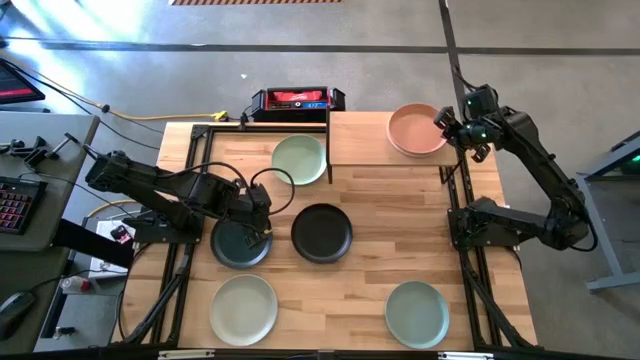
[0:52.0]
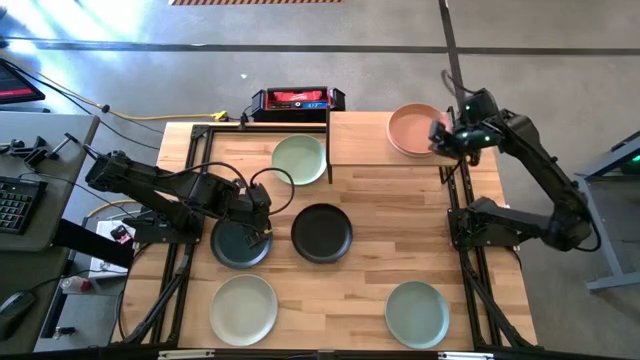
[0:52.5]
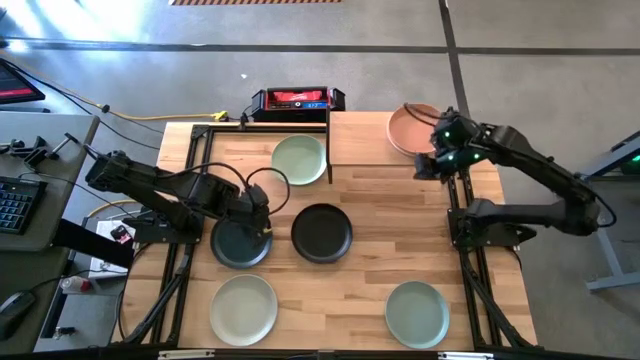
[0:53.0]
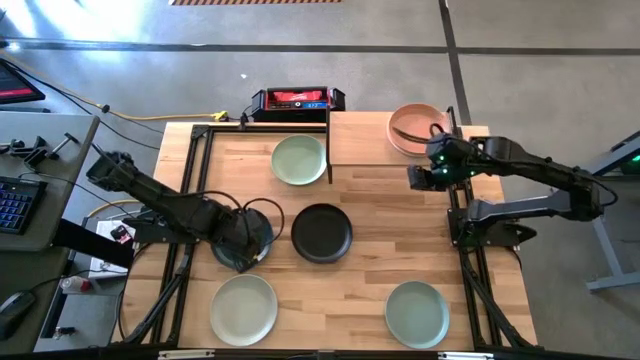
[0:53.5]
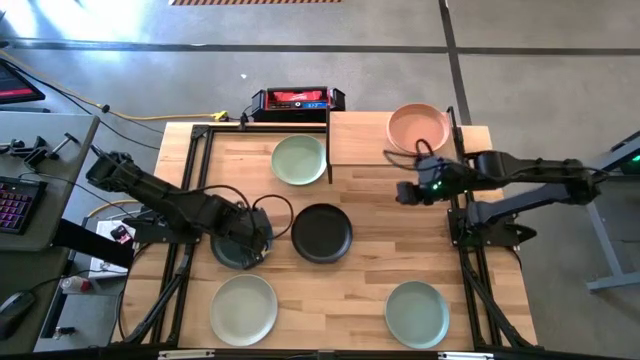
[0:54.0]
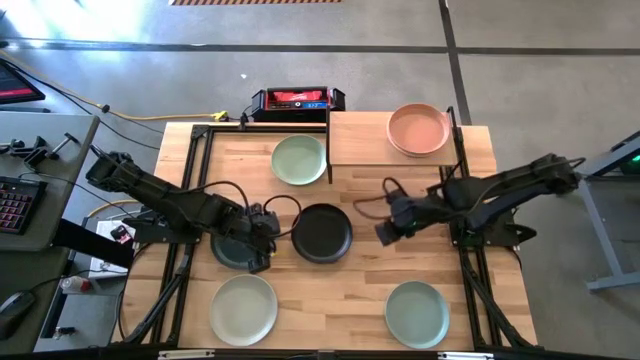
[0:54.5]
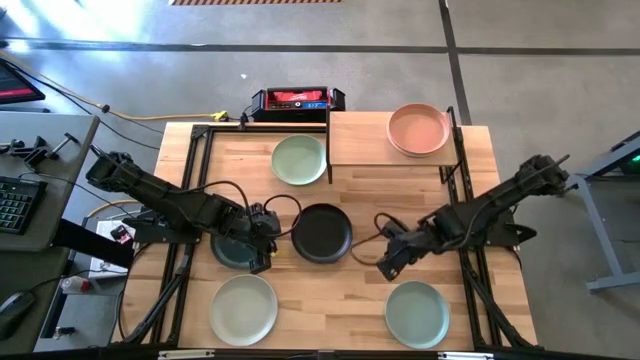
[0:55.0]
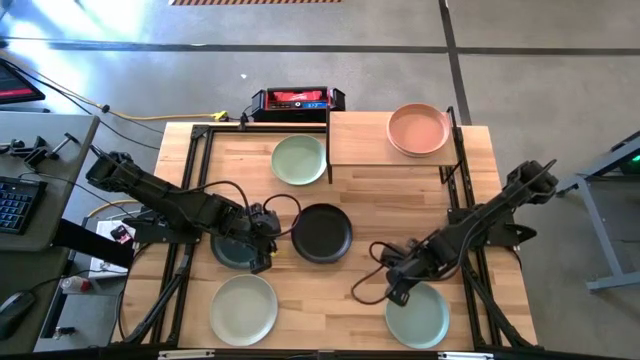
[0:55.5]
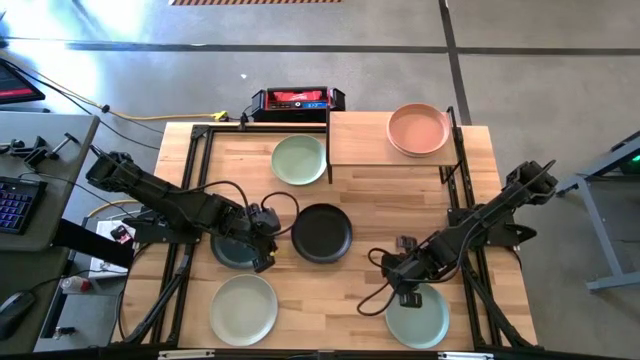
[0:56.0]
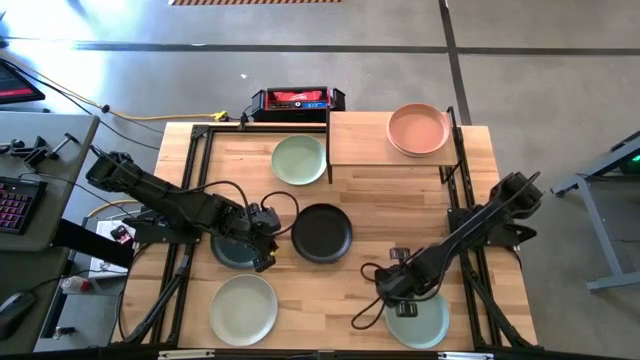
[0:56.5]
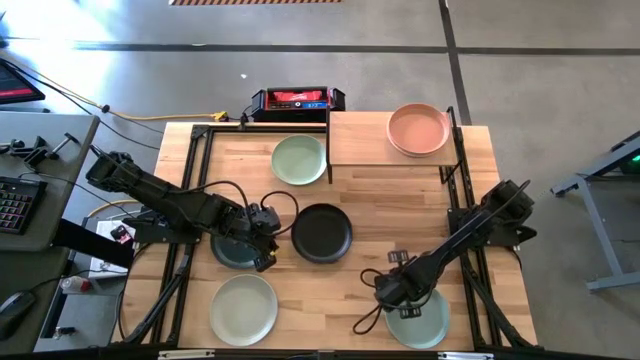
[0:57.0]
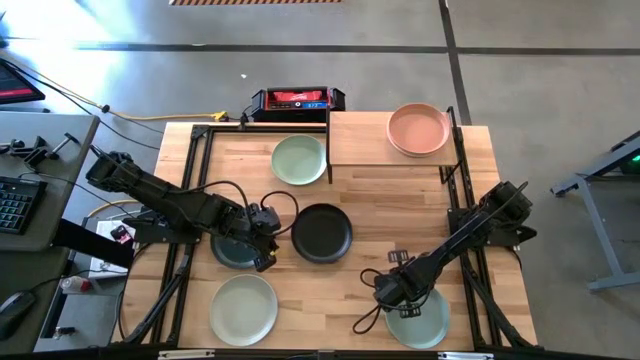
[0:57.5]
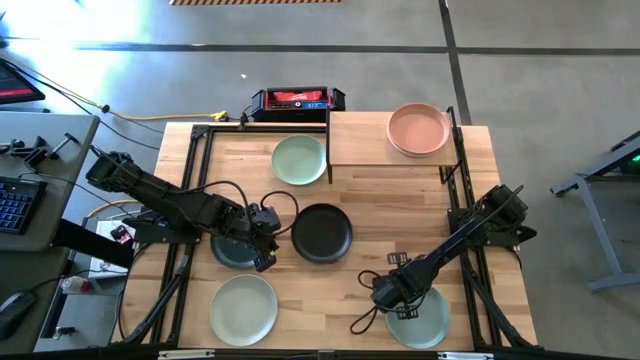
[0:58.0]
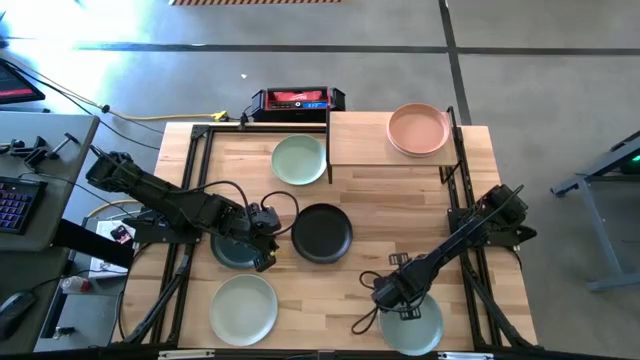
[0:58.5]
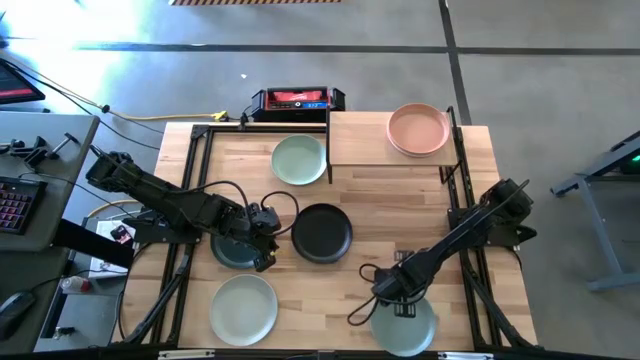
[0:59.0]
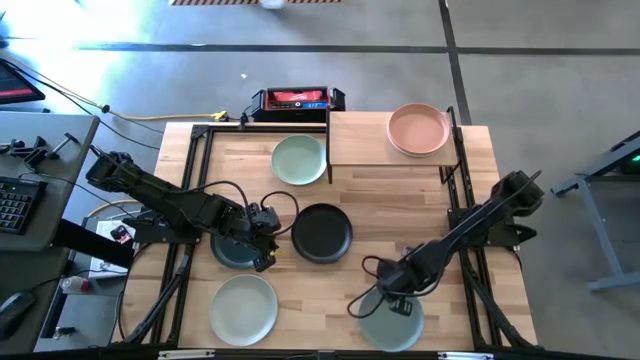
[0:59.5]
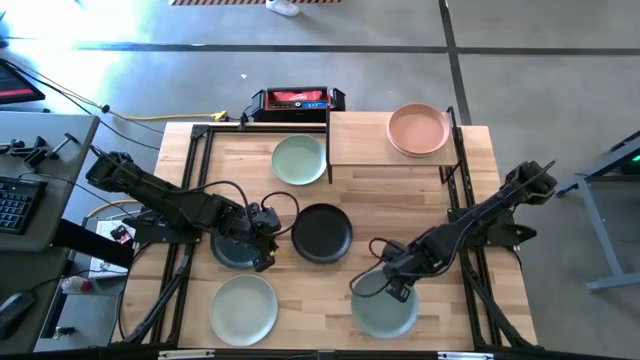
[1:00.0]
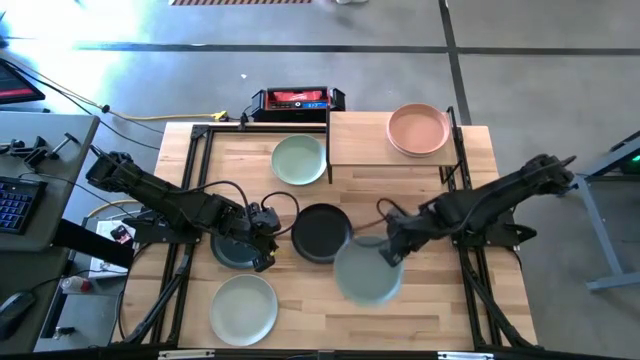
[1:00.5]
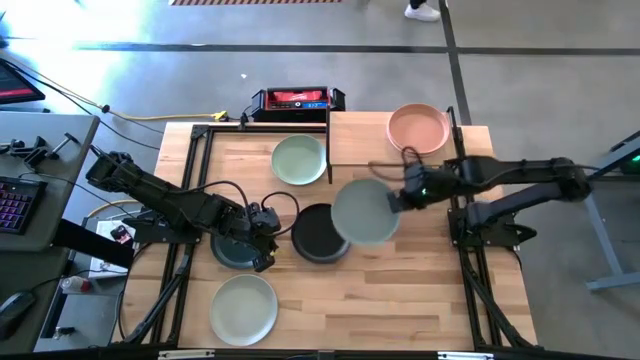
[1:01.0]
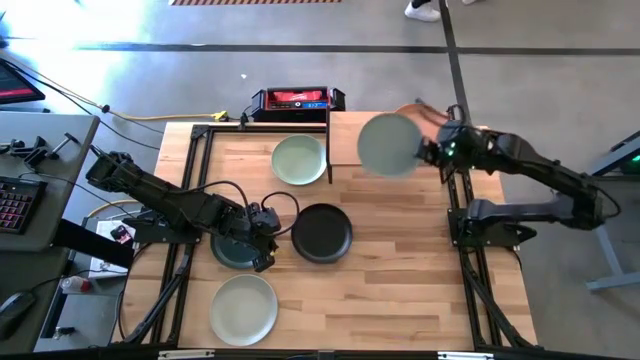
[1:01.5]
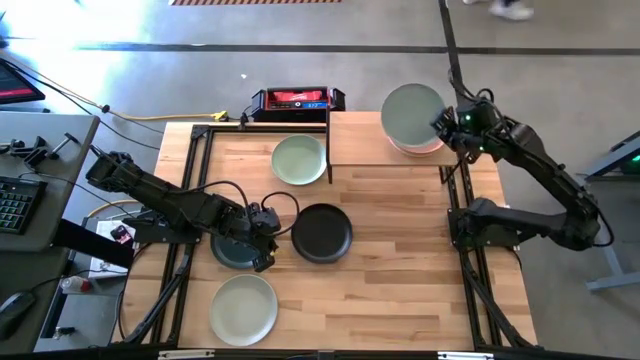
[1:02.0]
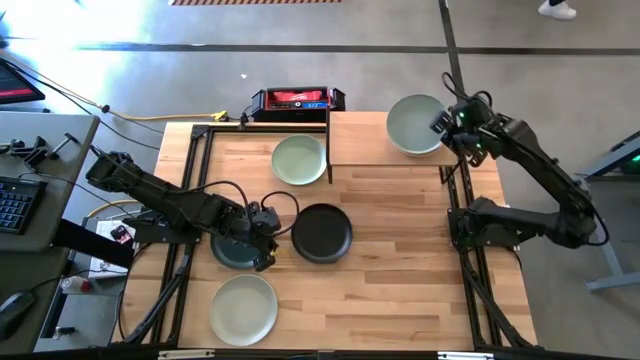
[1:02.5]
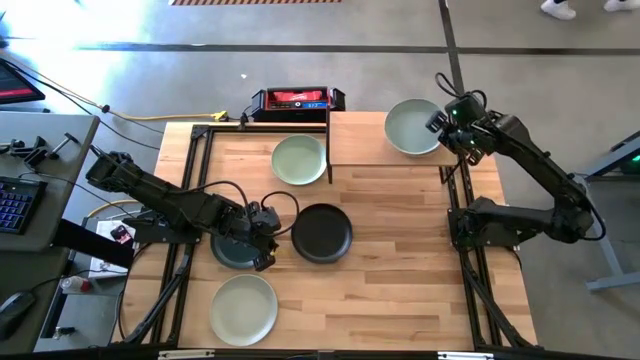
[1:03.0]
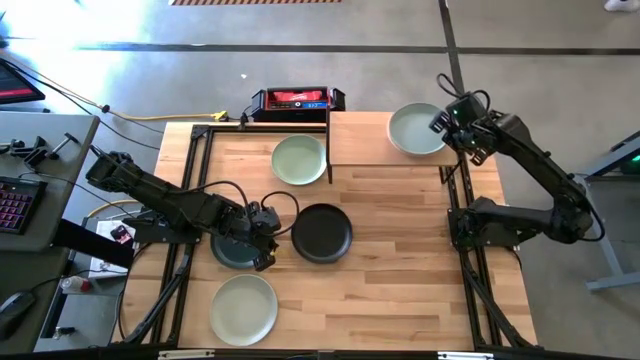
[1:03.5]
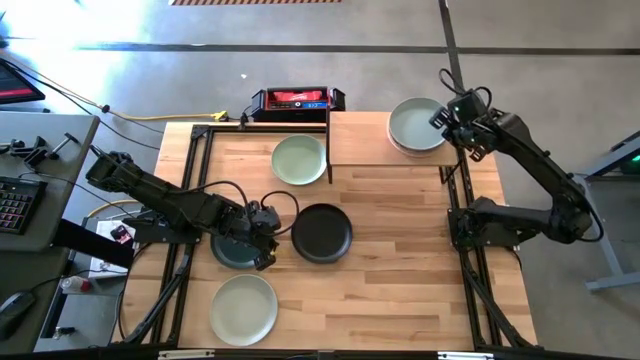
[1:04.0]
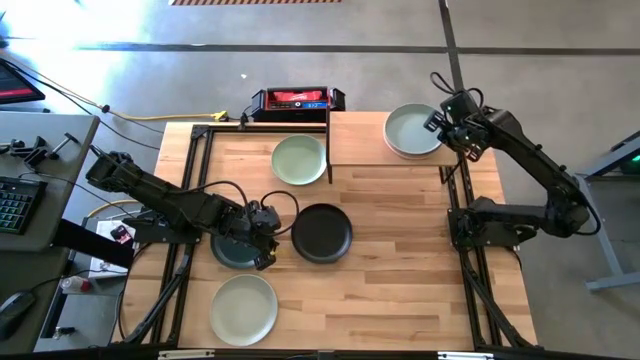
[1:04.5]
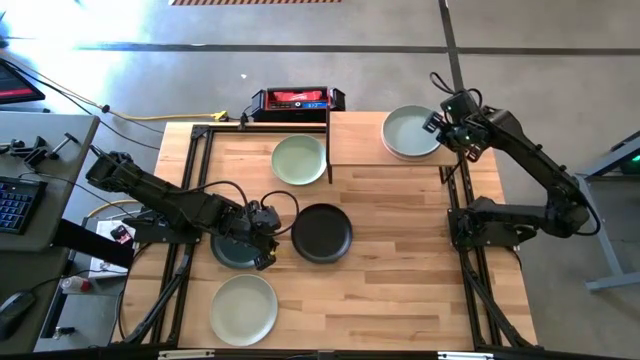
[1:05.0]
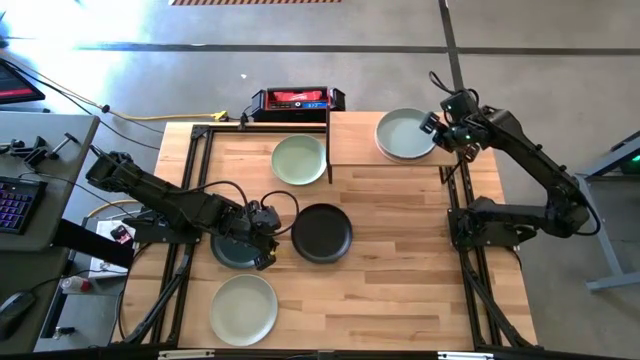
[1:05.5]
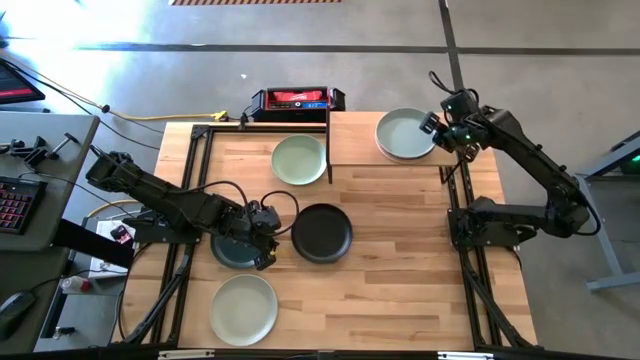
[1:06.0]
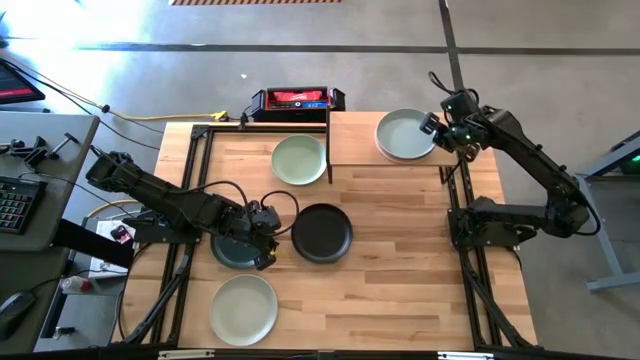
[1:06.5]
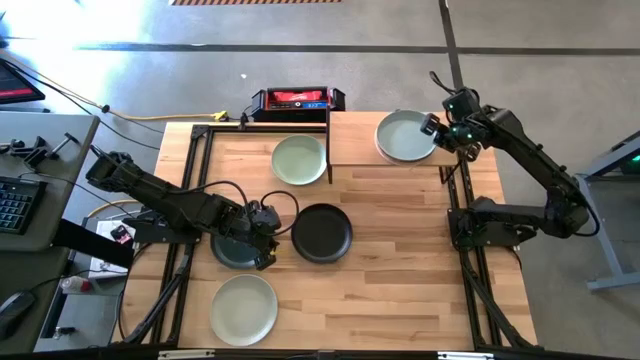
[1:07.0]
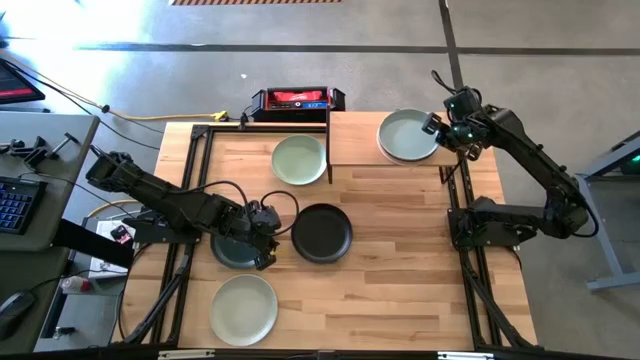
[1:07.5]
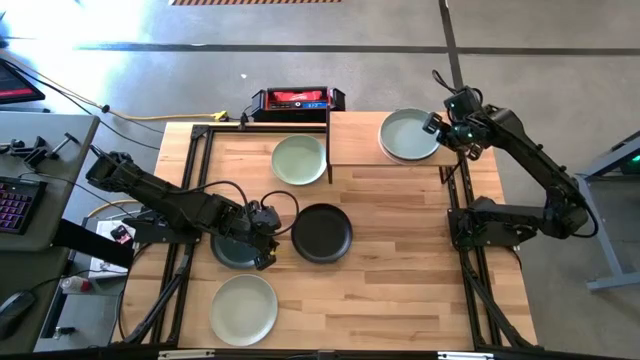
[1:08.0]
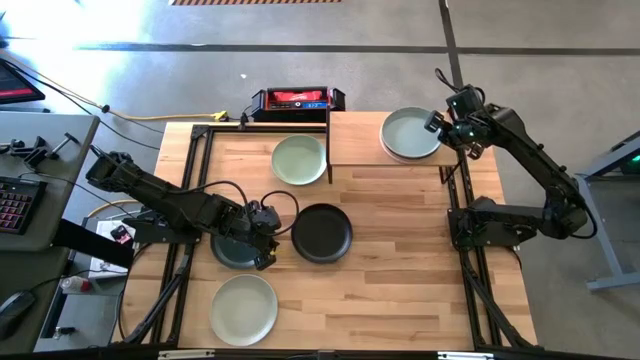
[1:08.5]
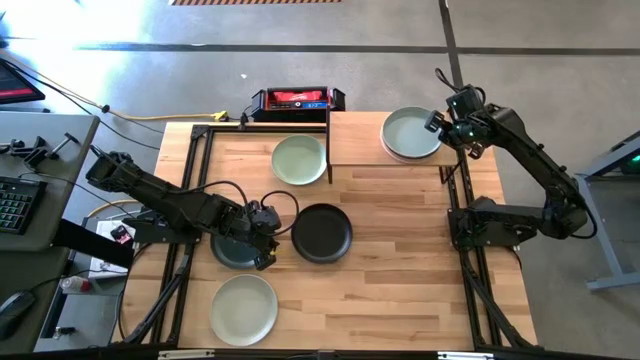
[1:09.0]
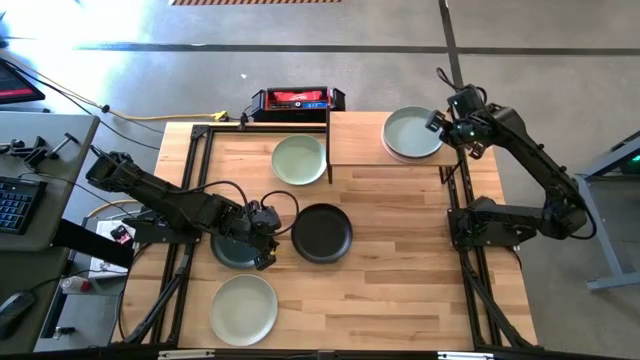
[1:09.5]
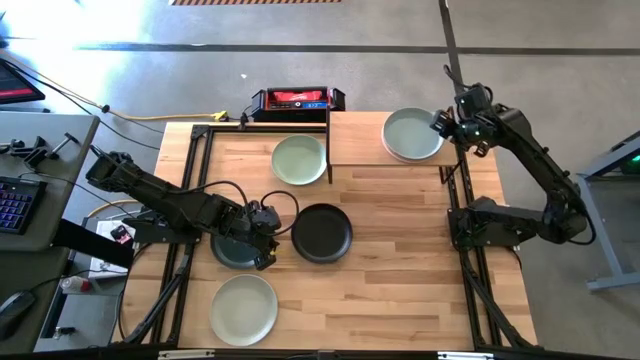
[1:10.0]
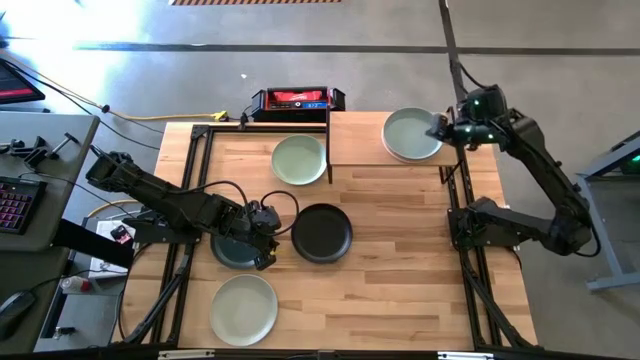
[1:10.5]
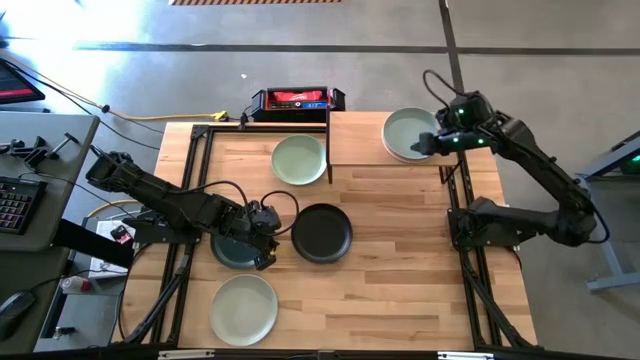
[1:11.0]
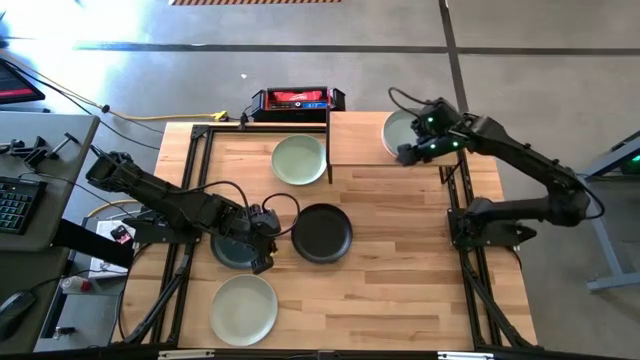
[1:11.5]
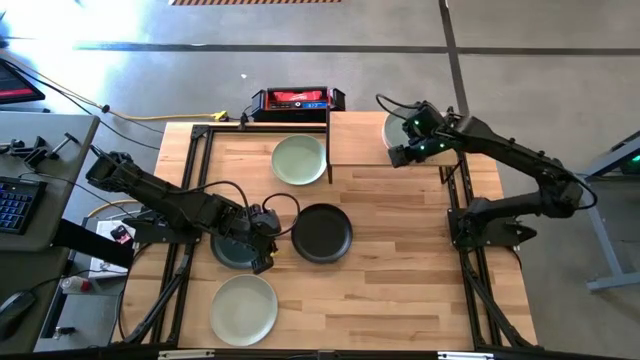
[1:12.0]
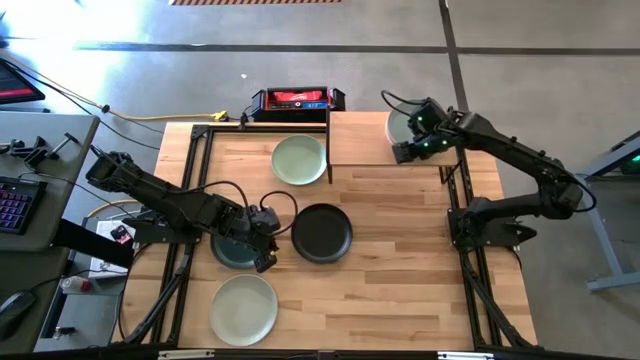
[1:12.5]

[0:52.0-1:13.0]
Task: Place and stack plates onto a shelf
Stack the light blue plate on top of the orange plate on the shelf
